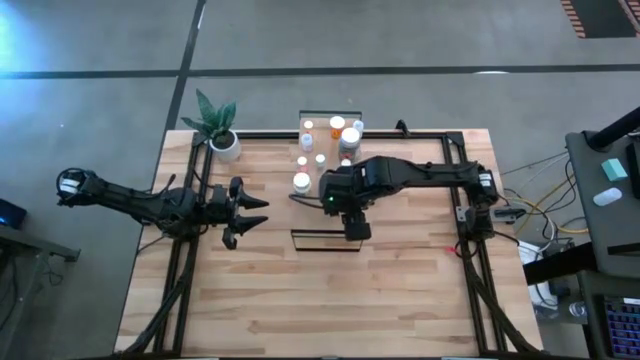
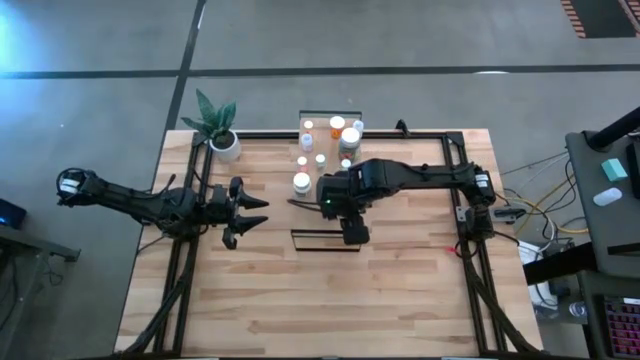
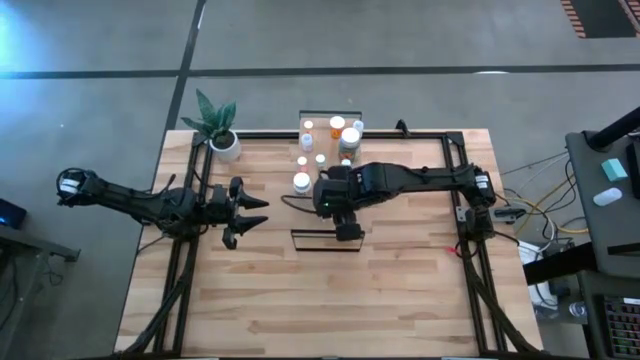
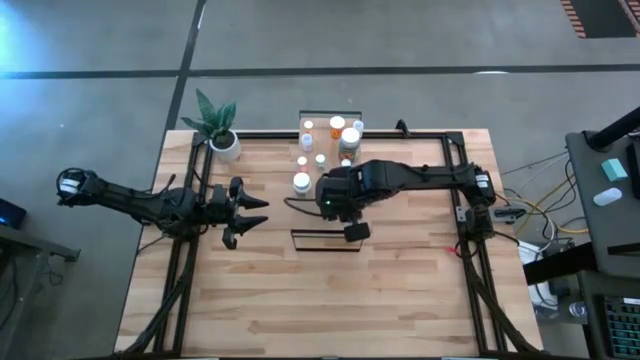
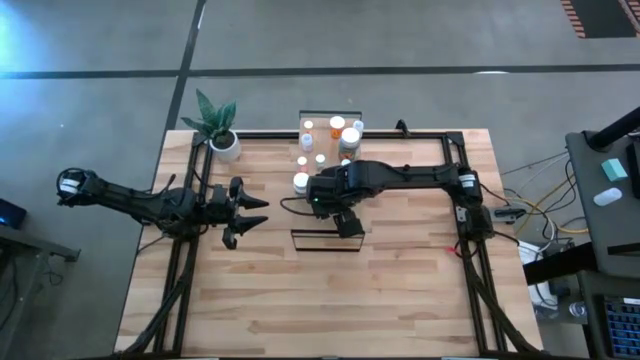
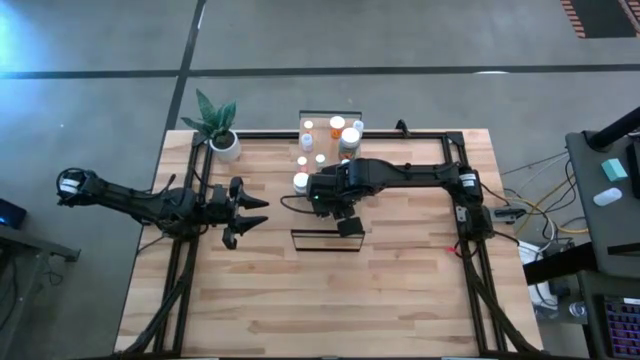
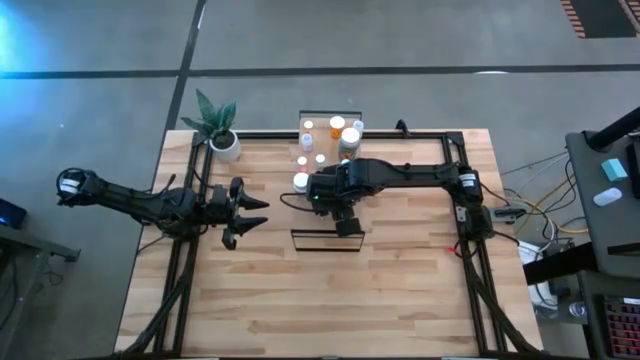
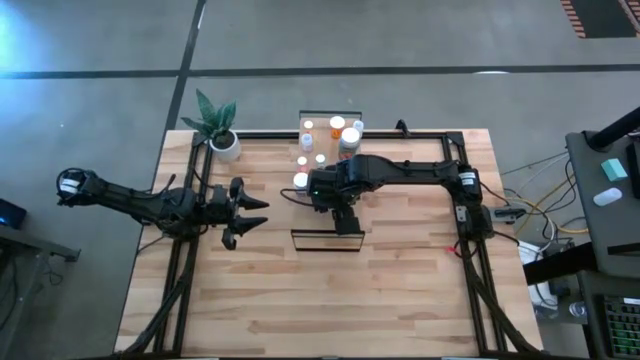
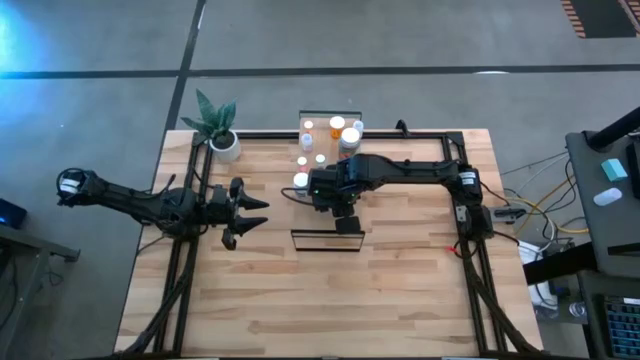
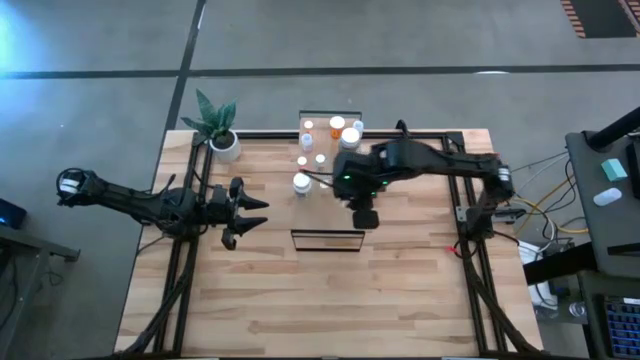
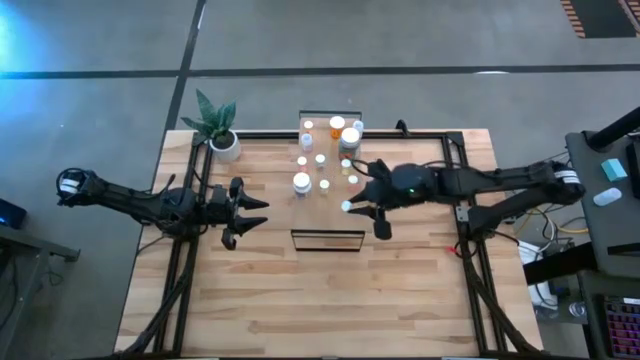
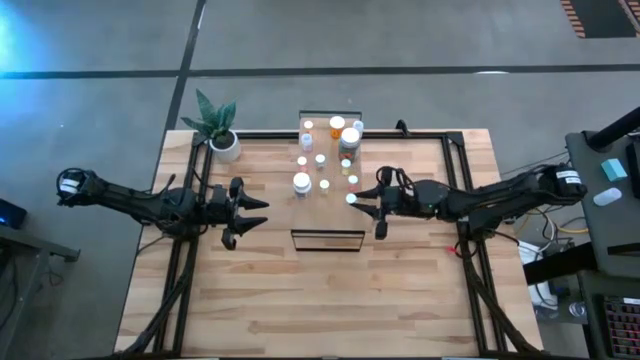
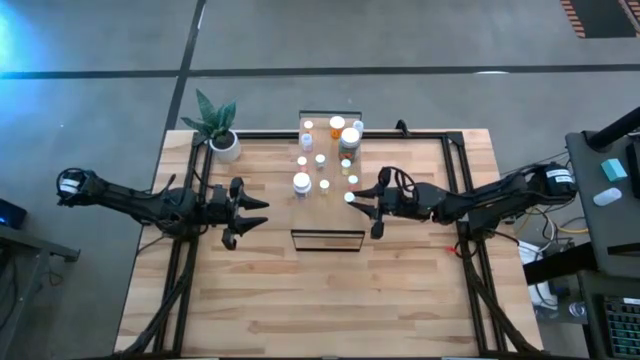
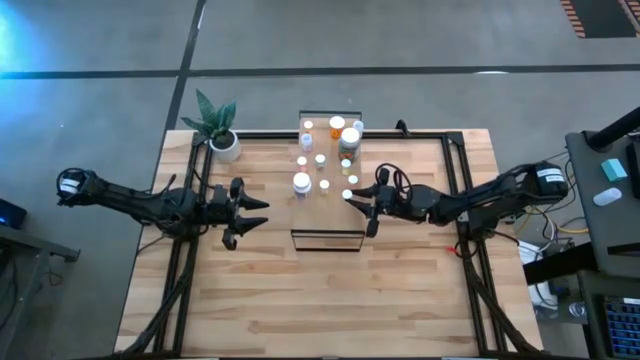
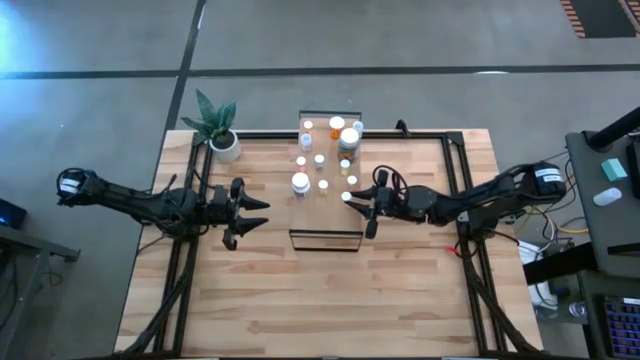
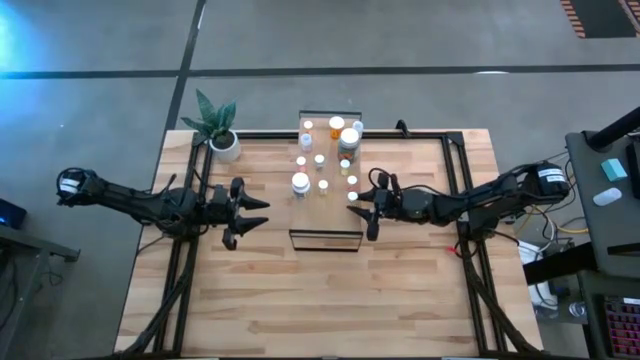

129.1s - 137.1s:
Task: Pick and place medicine bottles onto shelf by color
Put the yellow pill bottle on the shelf

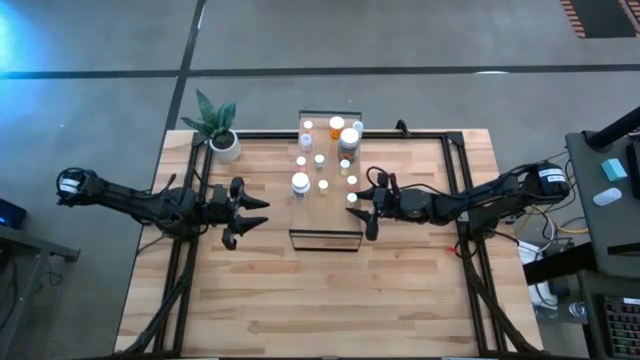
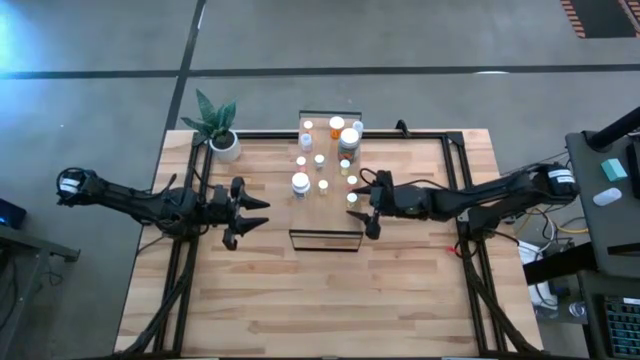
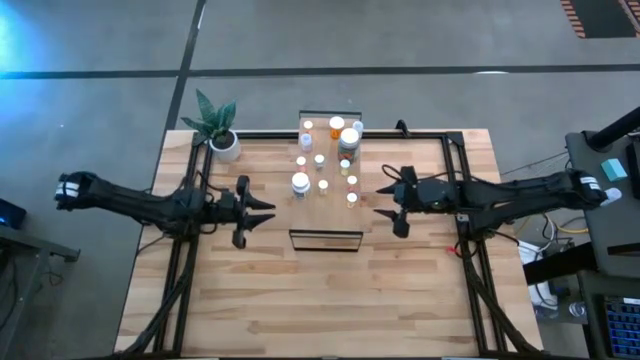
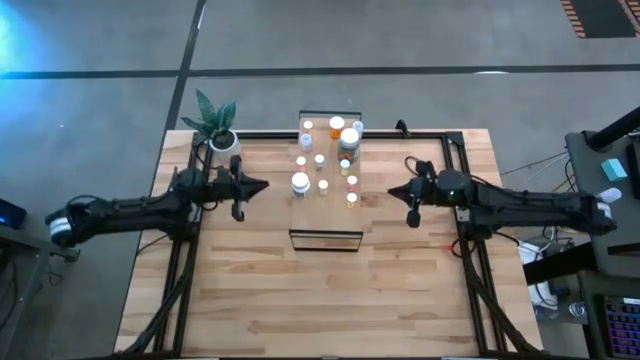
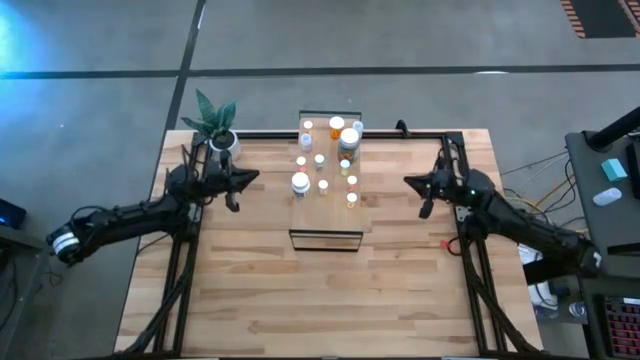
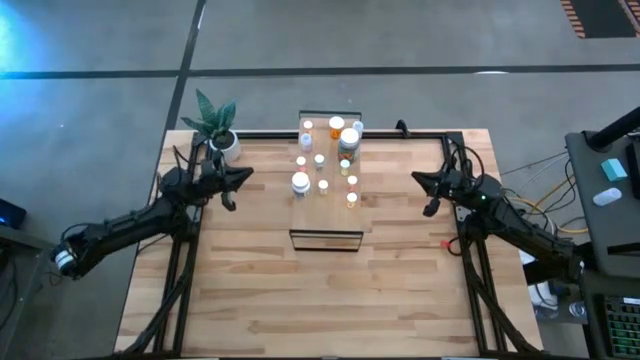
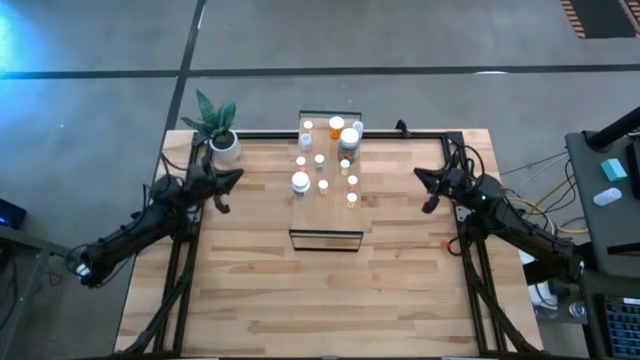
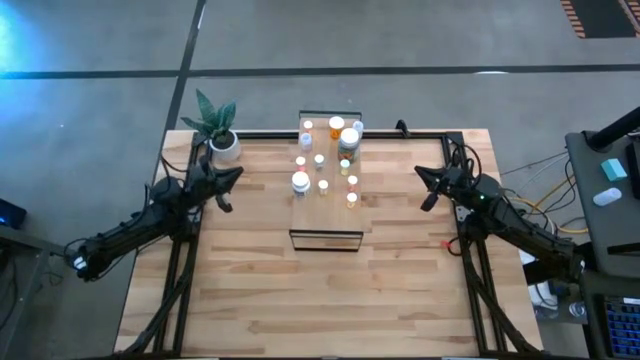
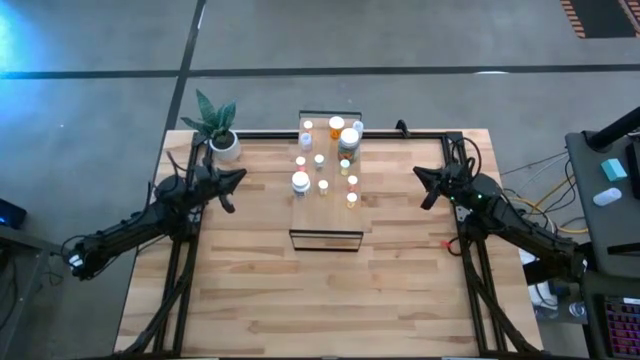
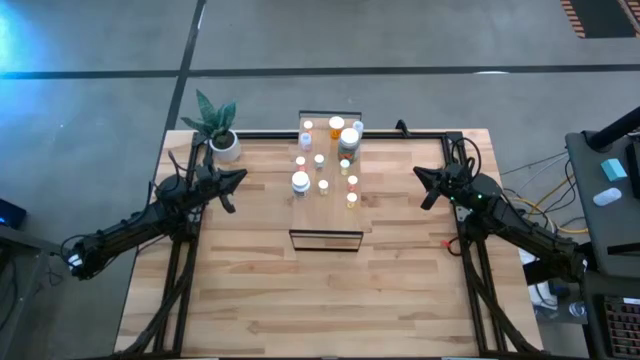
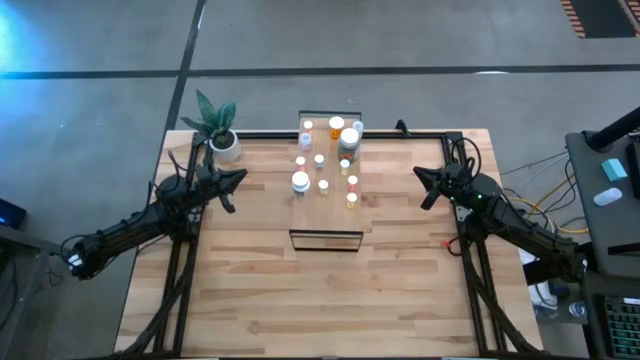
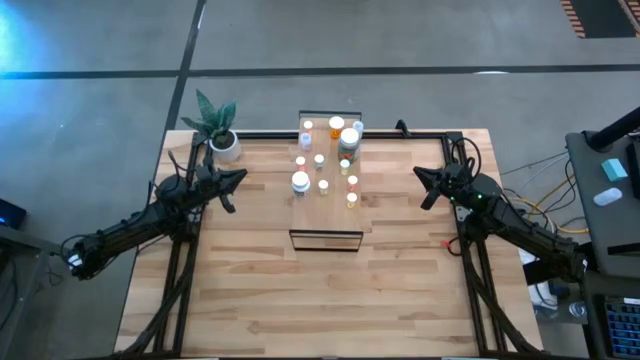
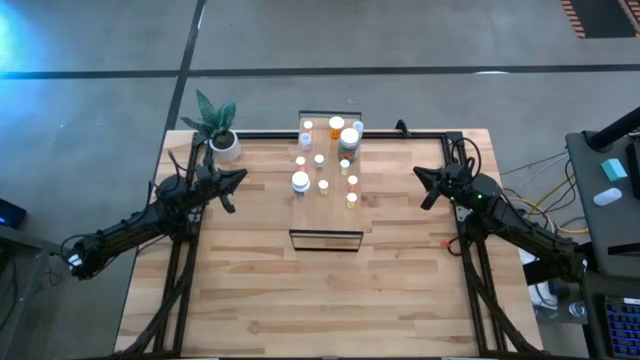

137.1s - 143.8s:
Return to Home Position

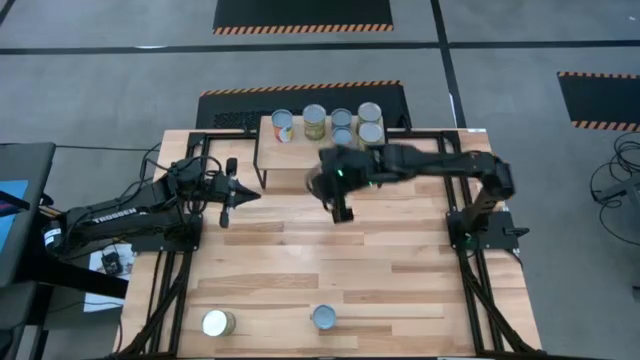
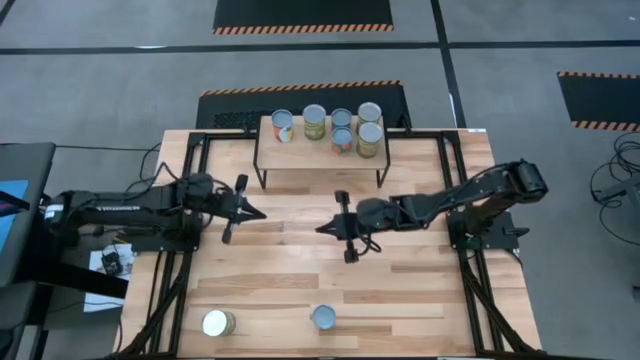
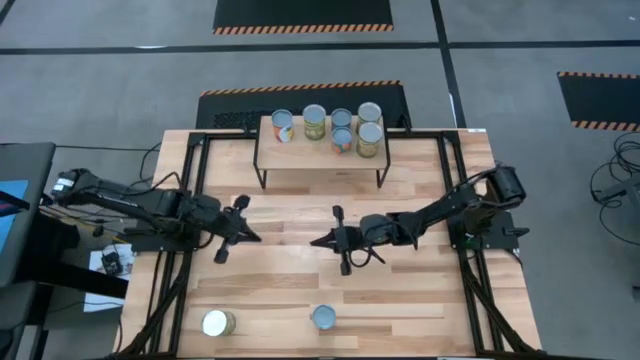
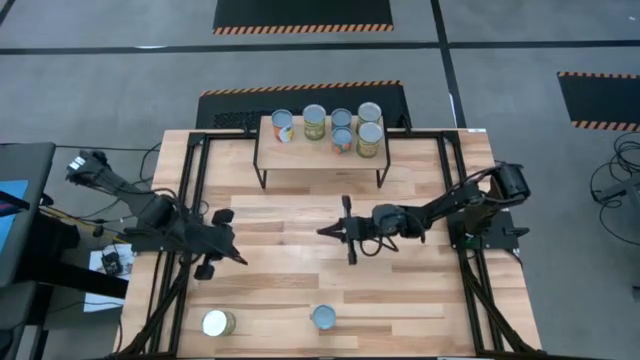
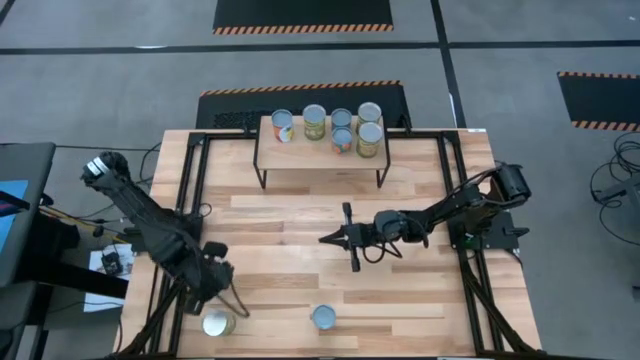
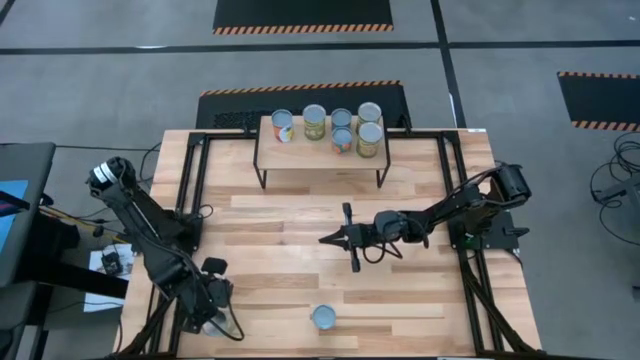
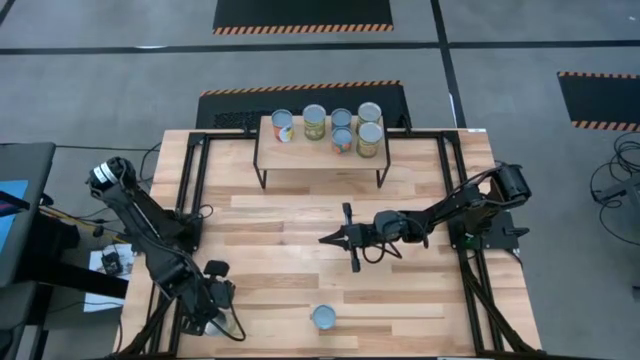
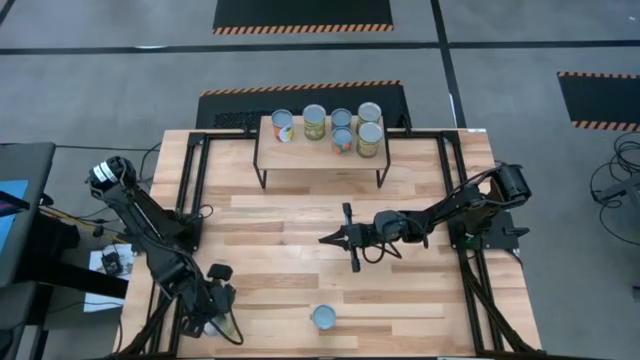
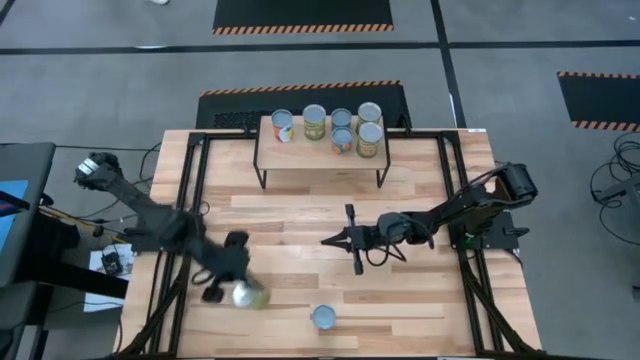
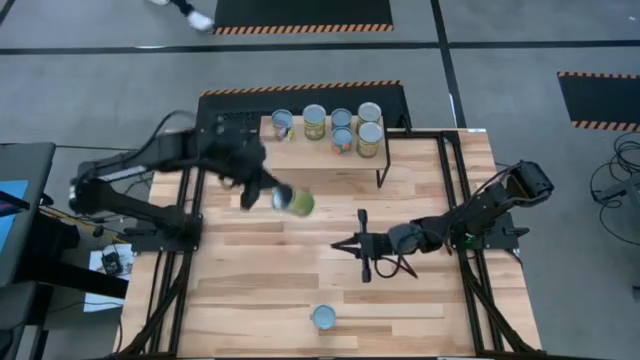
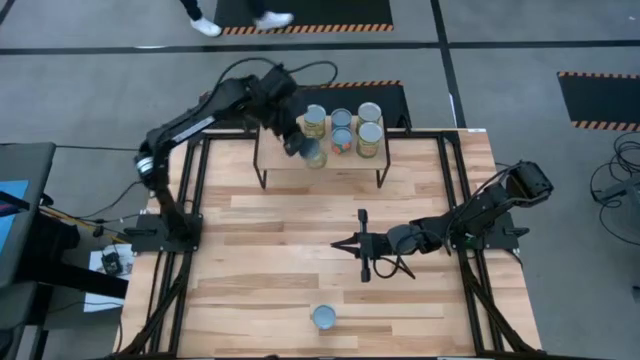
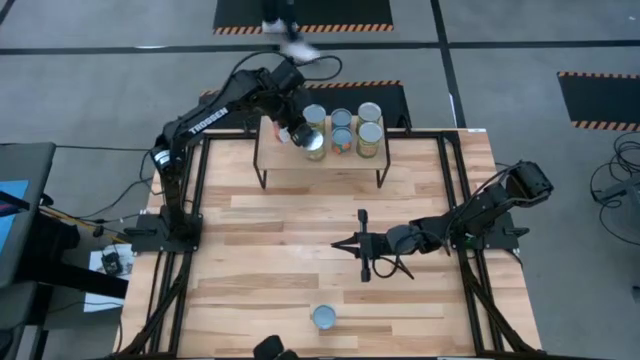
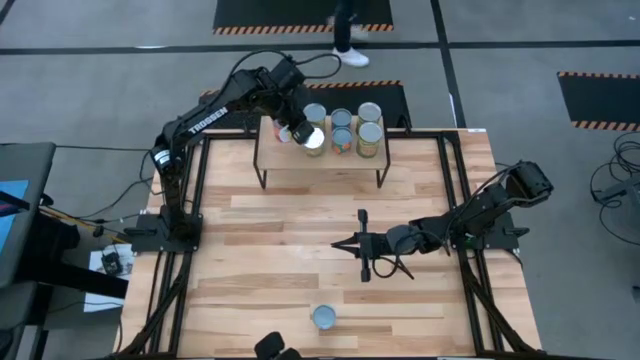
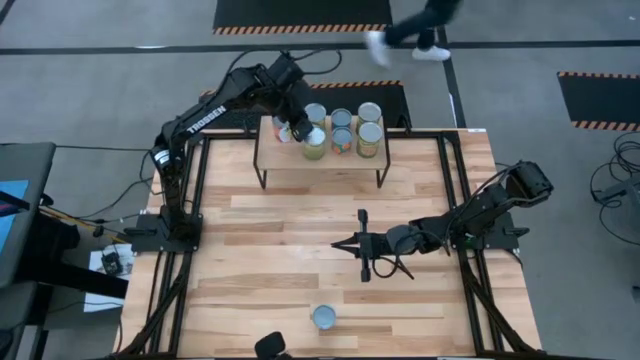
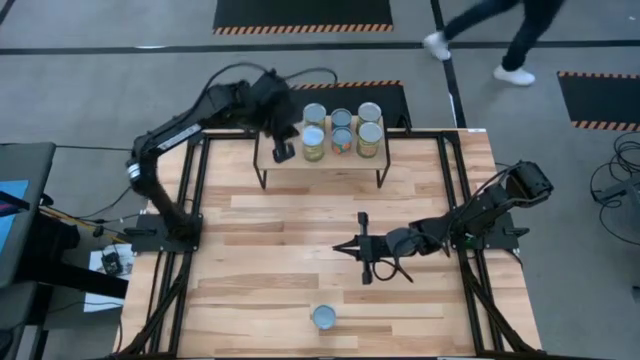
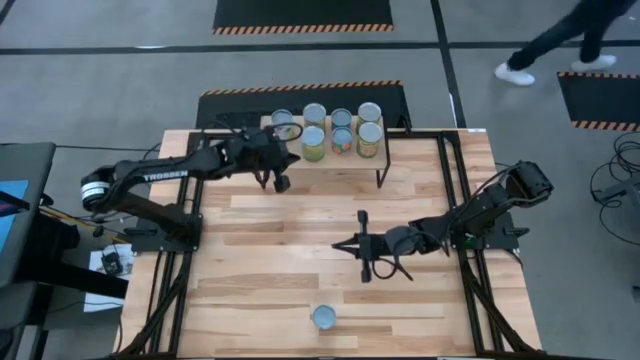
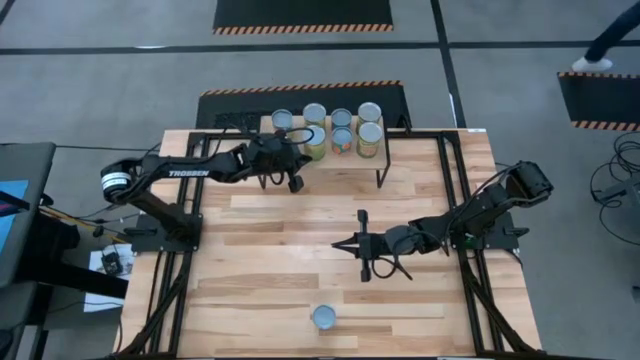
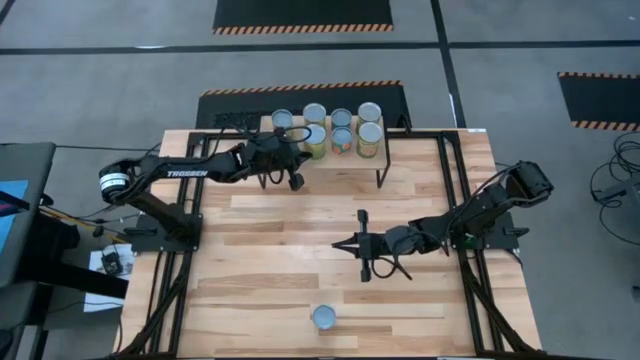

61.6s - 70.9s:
Task: Pick and place cans onto a shelf
Put the middle left large light green can on the shelf and align it with the large light green can
